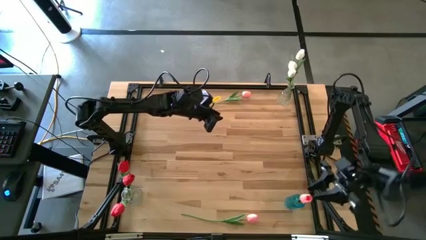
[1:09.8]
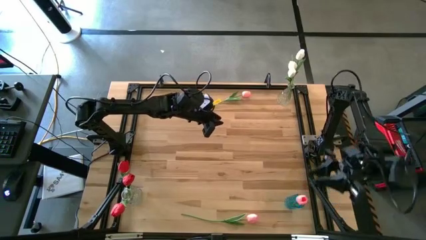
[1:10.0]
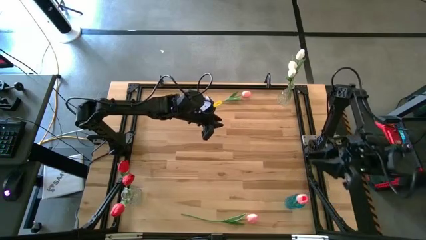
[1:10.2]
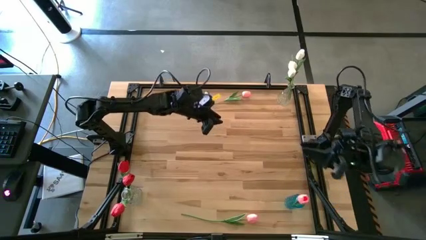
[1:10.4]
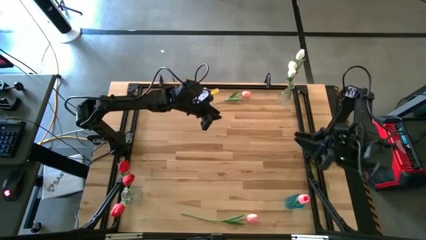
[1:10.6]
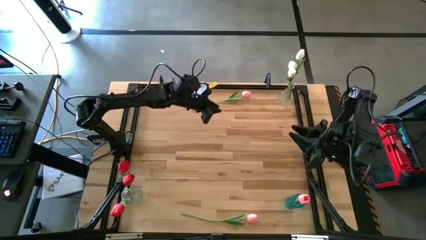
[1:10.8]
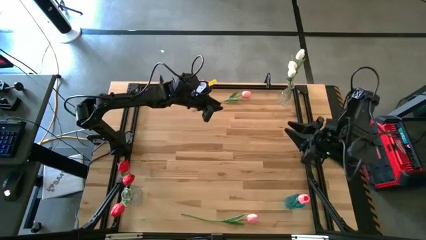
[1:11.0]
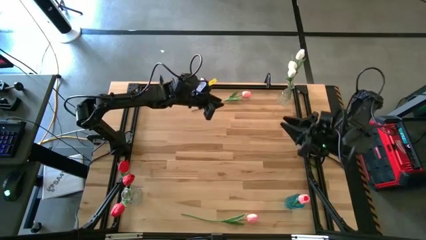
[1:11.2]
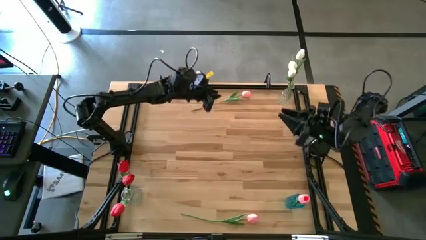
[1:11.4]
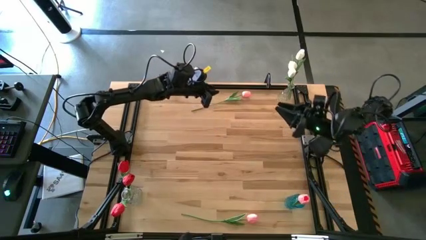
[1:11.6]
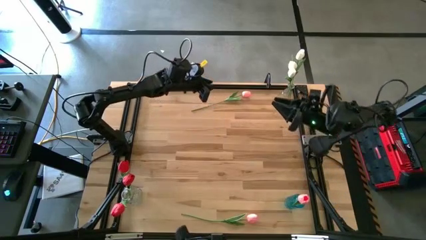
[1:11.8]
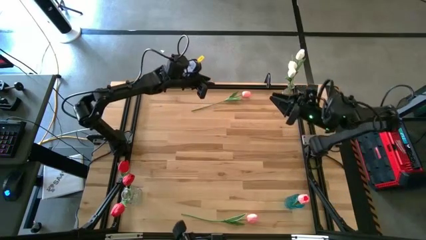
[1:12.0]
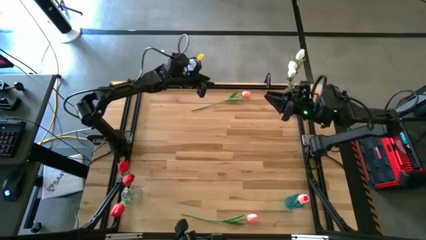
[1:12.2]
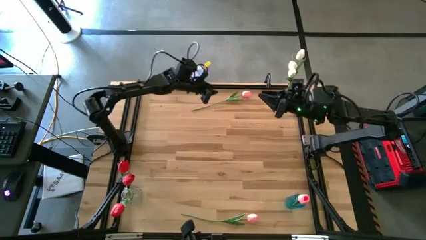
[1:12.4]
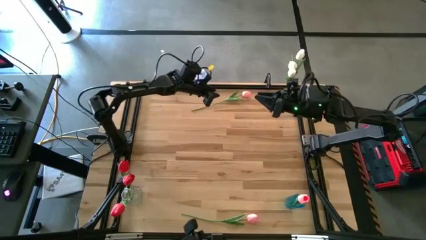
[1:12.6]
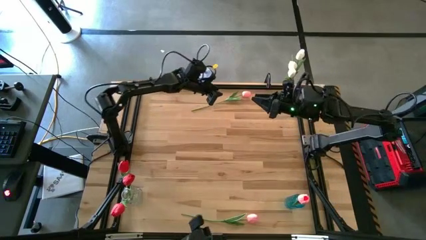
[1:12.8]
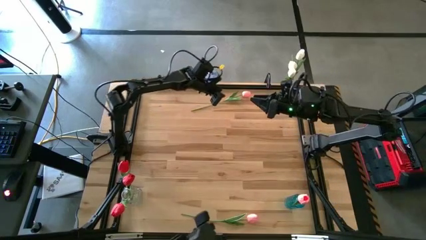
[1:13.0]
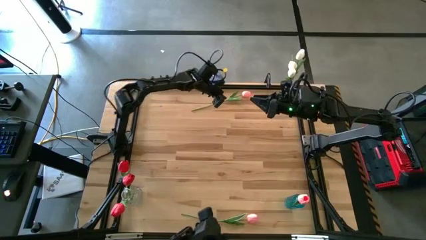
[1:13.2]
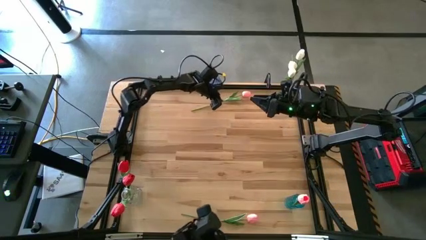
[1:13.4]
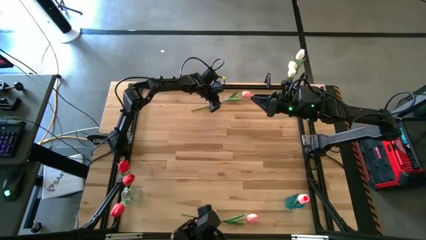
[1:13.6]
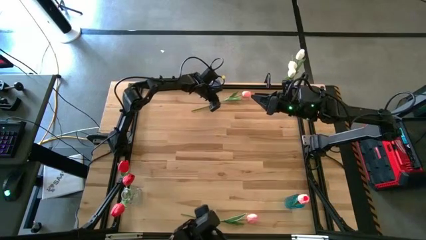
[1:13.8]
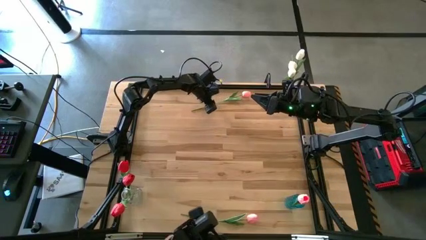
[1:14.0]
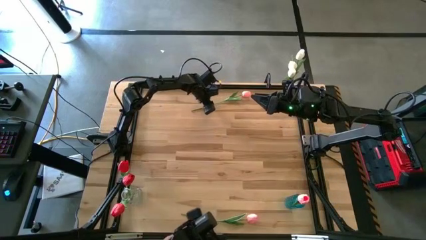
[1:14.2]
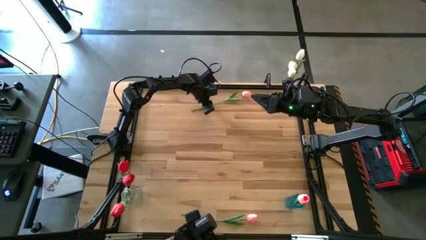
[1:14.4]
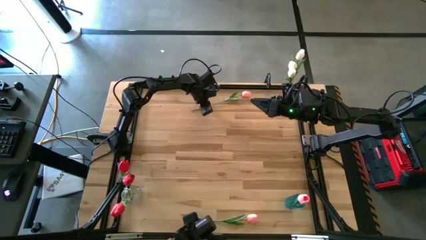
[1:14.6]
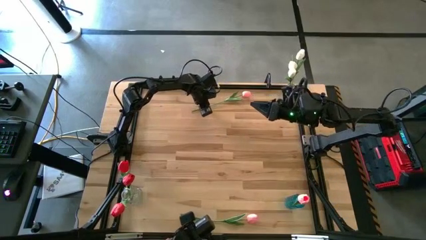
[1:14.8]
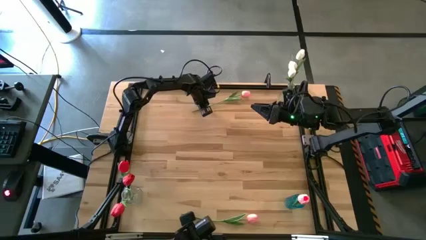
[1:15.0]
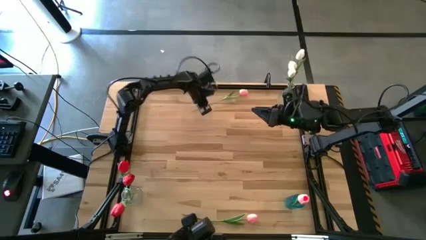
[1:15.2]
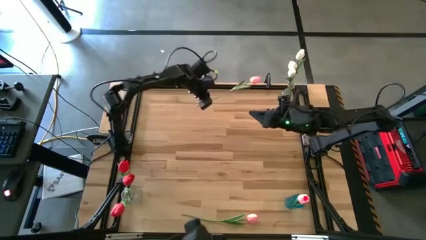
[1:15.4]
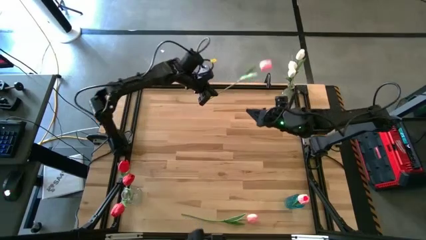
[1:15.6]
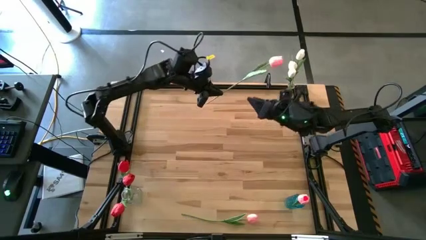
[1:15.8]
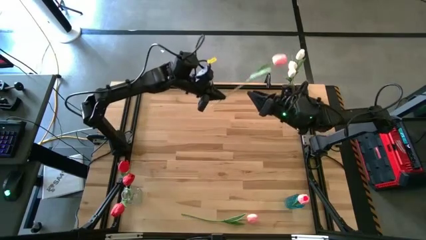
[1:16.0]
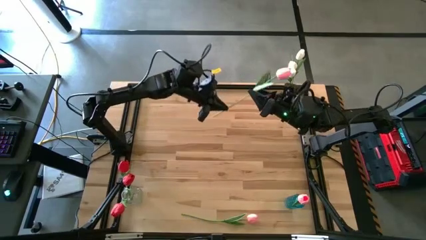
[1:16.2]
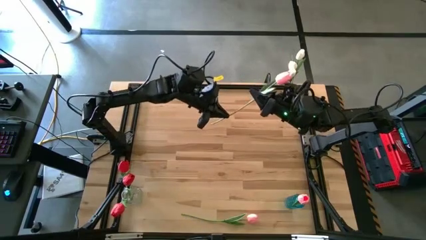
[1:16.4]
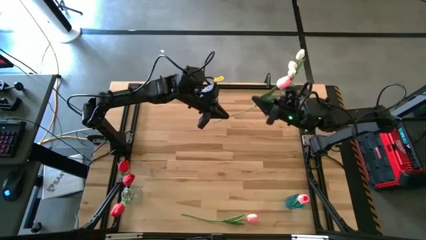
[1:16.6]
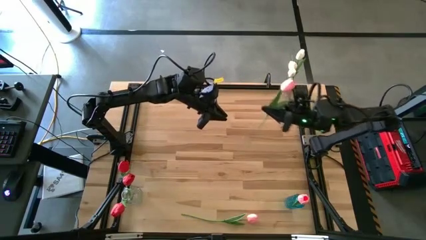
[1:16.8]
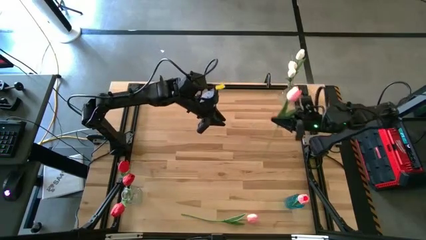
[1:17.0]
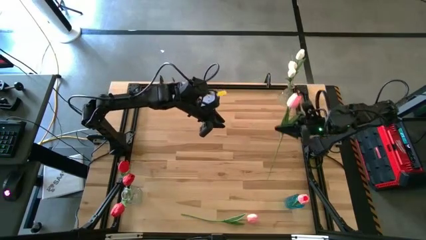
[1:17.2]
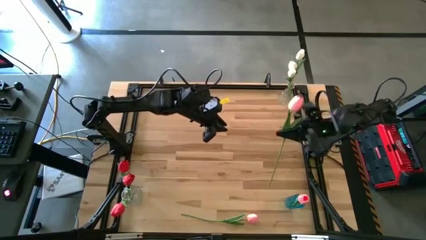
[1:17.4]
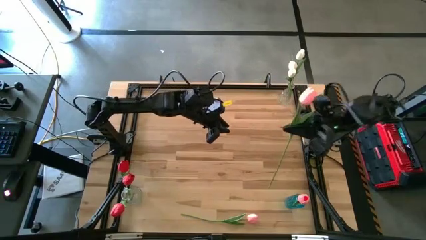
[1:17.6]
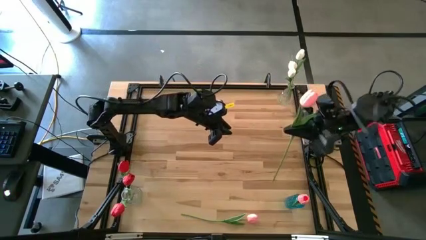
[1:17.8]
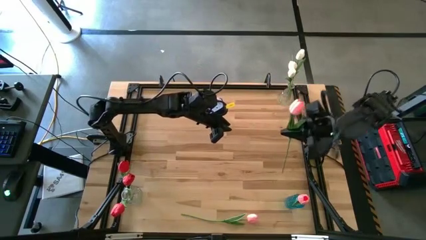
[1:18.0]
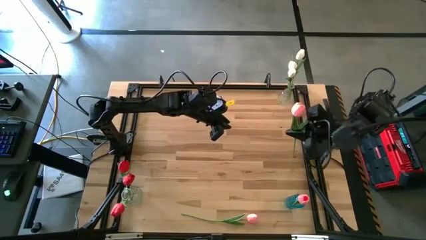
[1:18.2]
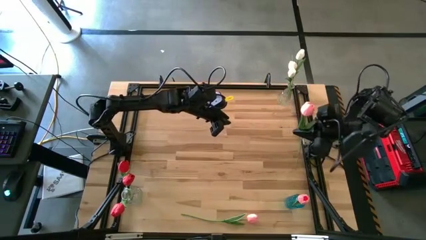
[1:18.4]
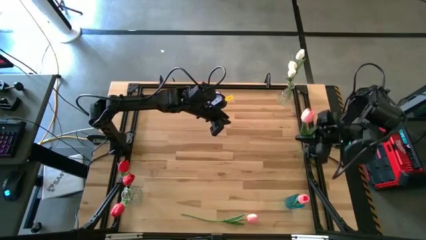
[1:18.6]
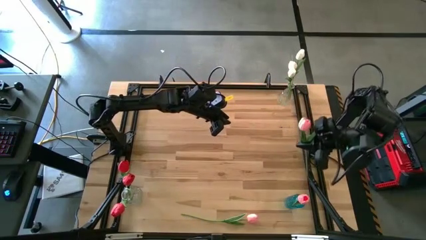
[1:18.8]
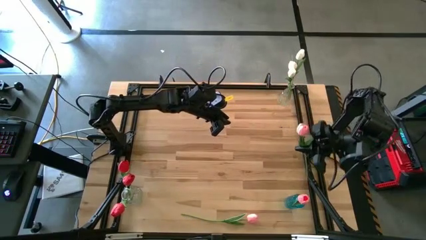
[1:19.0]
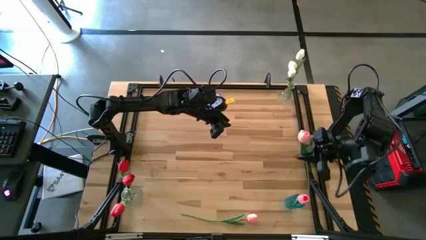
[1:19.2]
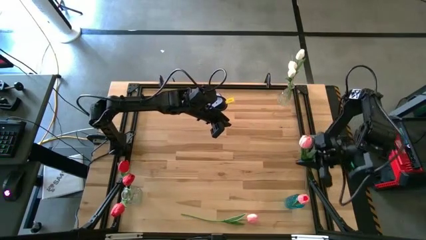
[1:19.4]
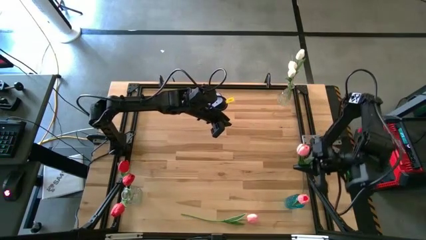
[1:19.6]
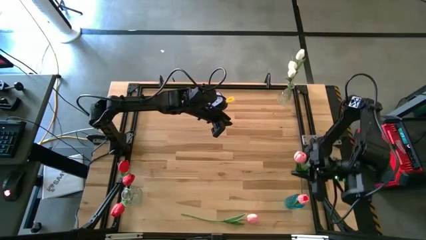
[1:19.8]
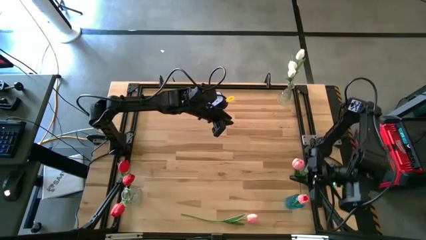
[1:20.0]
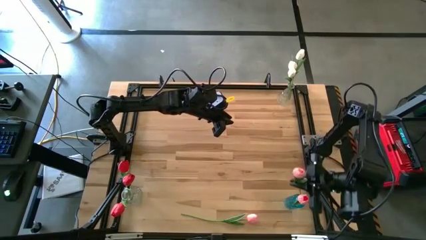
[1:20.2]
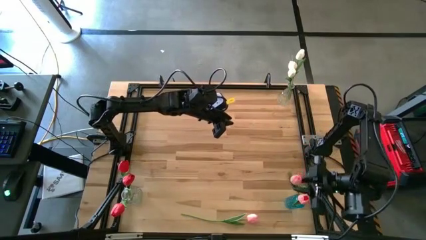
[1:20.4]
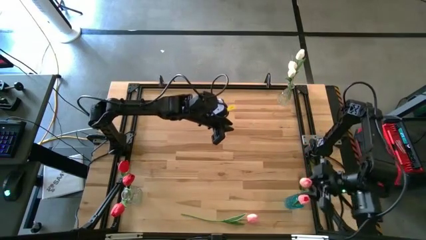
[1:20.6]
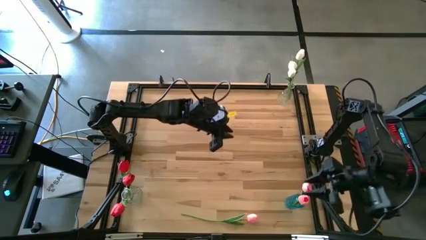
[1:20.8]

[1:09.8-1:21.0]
Task: Sort flowers into vase by color
Put the top pink tulip into the blue vase

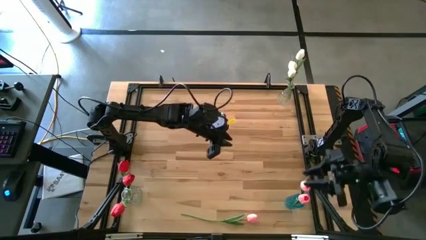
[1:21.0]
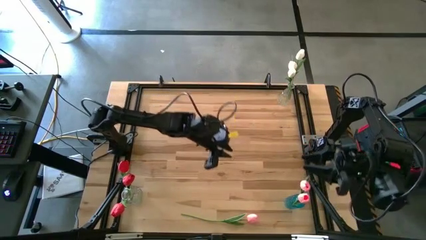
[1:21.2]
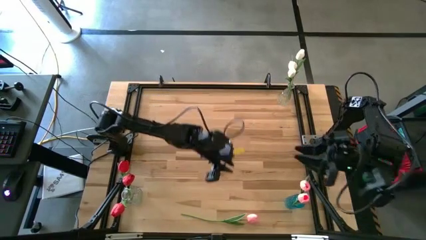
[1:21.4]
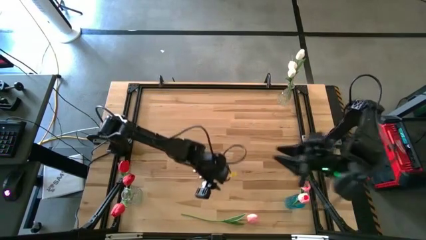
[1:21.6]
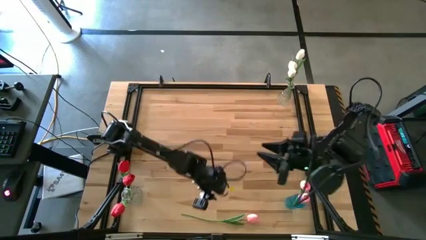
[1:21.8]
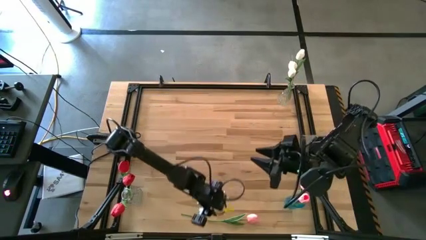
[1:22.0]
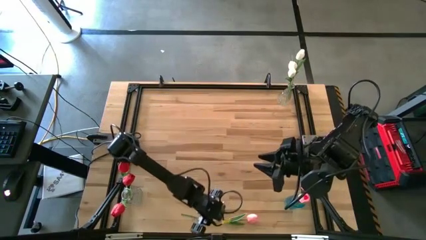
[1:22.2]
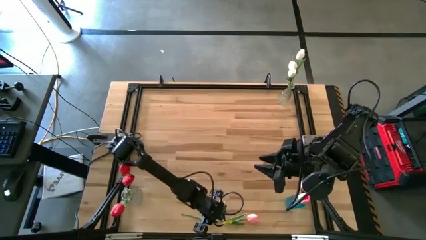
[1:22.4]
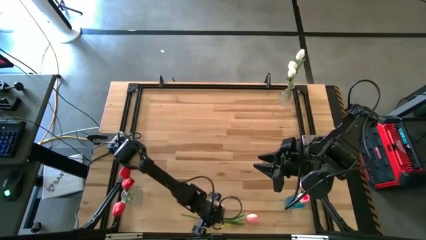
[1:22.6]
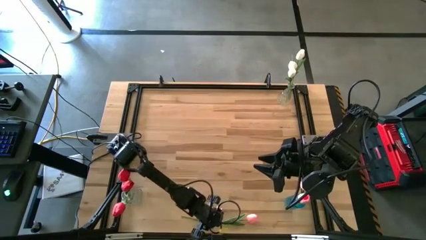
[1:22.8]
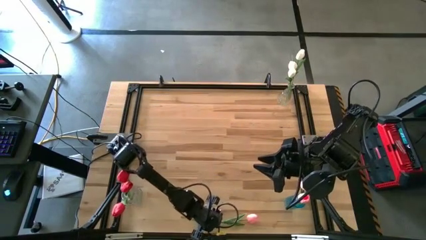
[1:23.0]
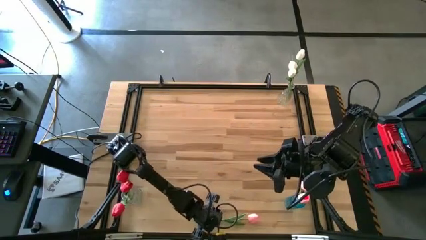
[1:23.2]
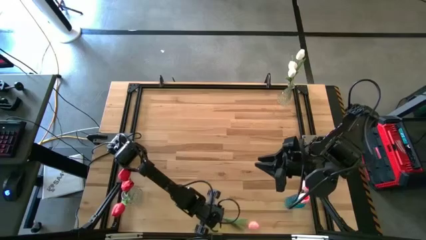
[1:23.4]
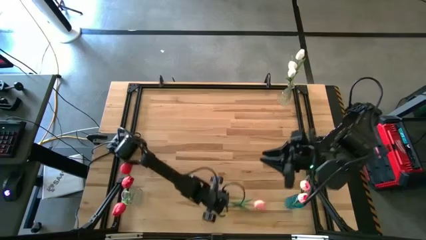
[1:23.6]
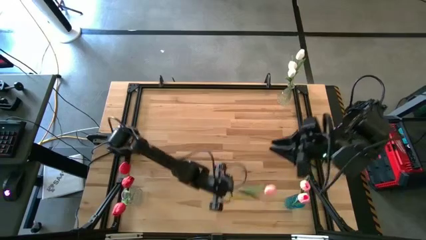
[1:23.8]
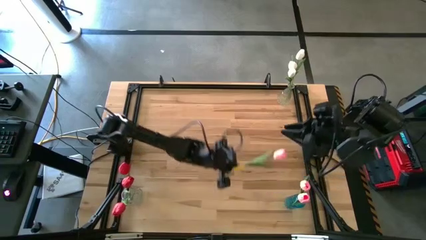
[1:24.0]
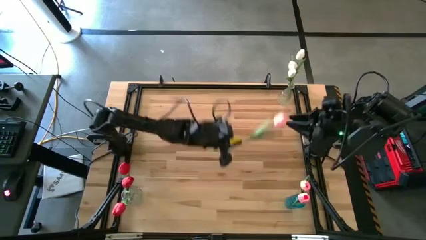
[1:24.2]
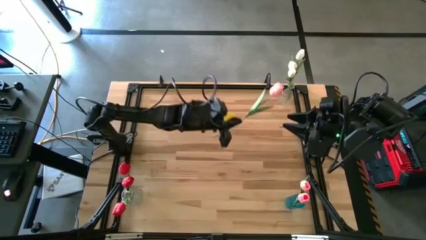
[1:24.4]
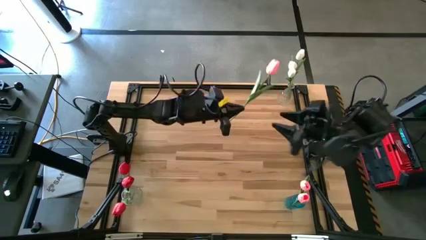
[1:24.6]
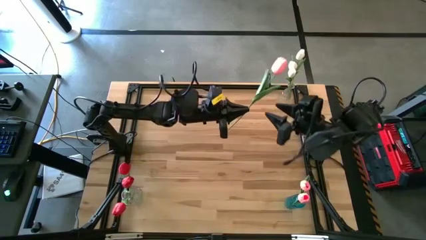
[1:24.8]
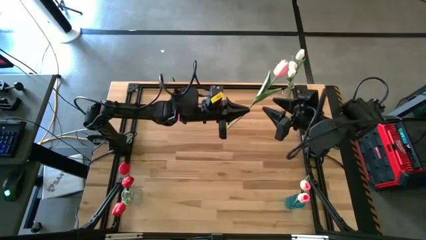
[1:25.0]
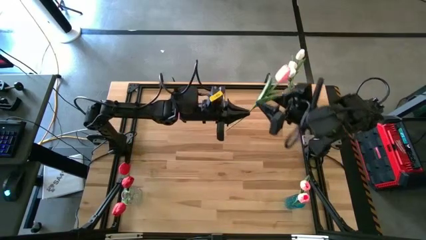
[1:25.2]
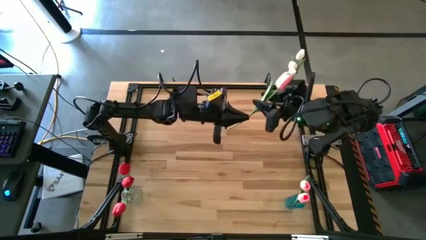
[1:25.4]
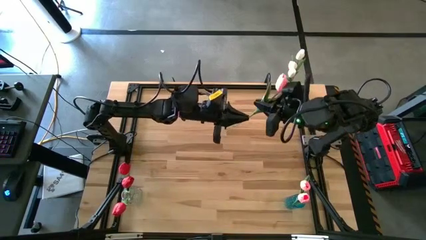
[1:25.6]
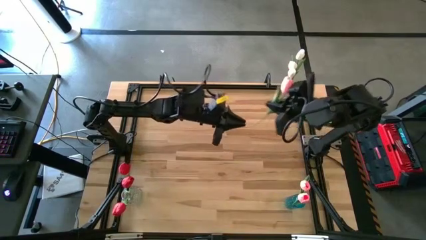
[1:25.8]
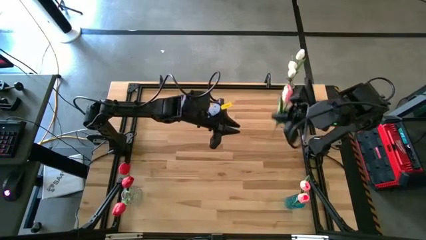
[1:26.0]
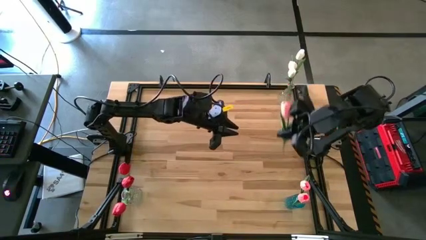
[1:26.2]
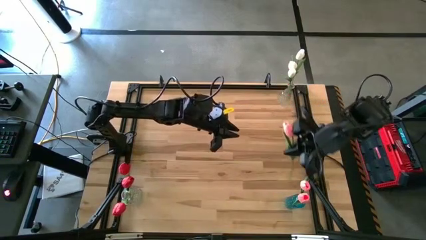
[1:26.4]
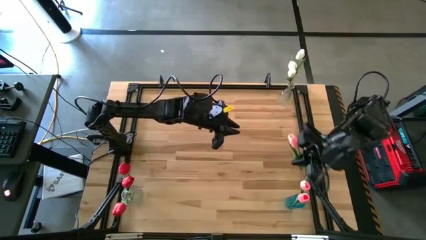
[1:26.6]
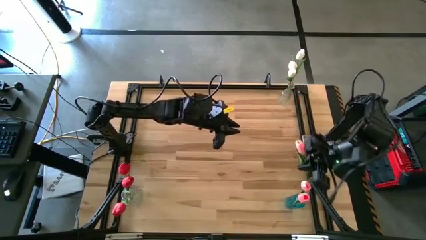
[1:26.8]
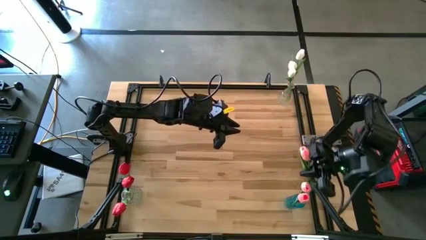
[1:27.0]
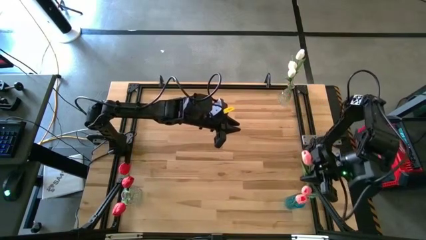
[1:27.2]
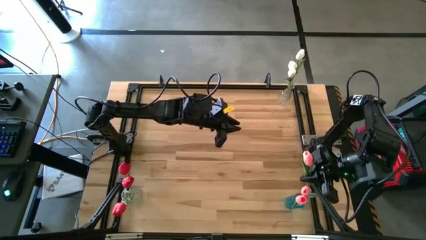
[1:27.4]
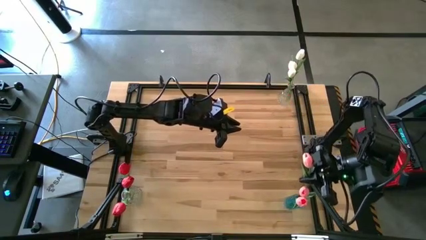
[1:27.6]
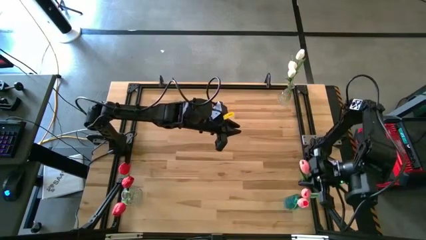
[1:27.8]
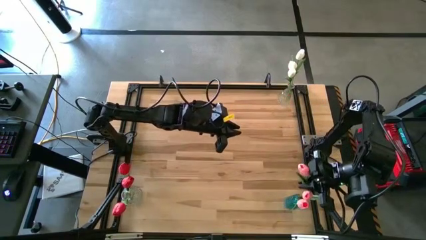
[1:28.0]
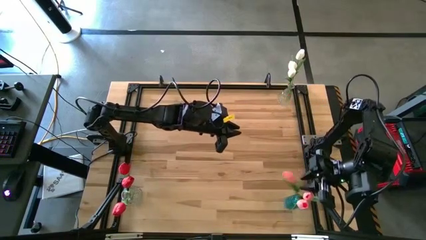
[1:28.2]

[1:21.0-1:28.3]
Put the pink tulip into the blue vase
